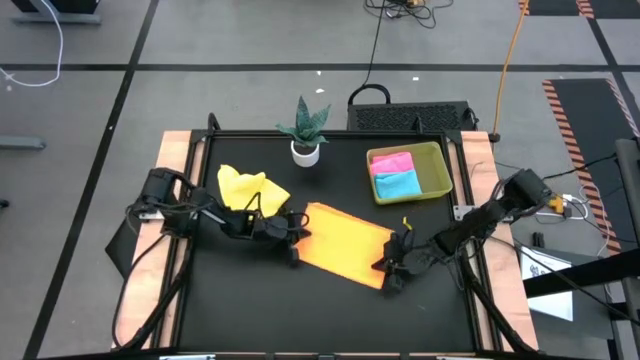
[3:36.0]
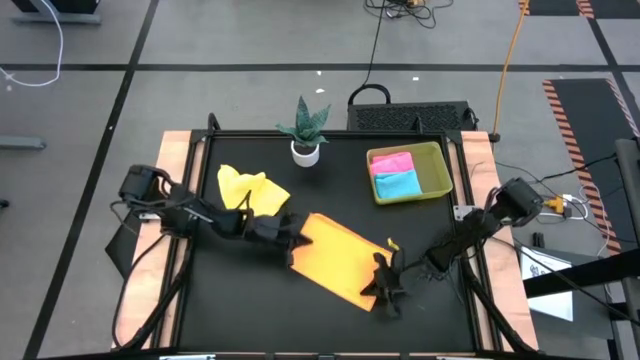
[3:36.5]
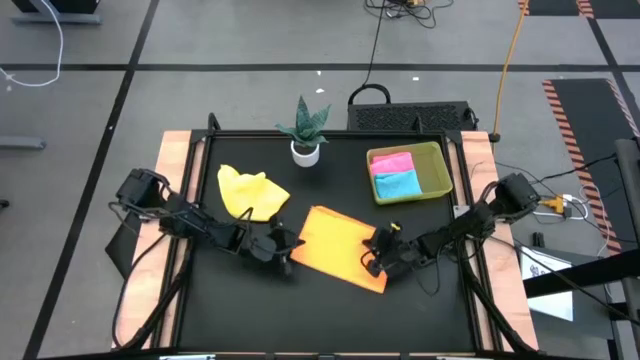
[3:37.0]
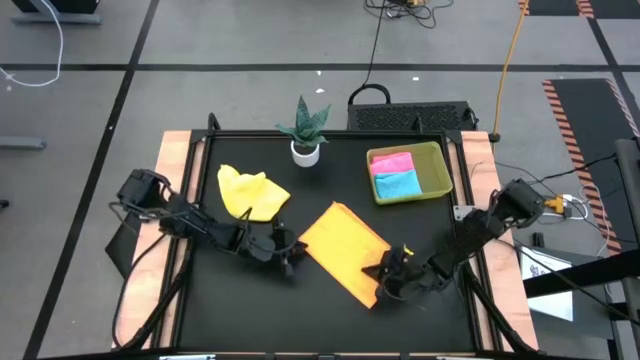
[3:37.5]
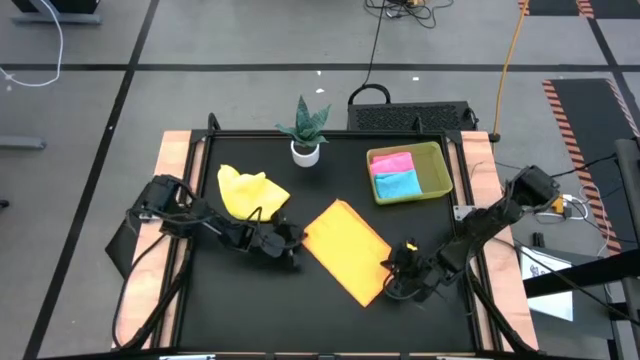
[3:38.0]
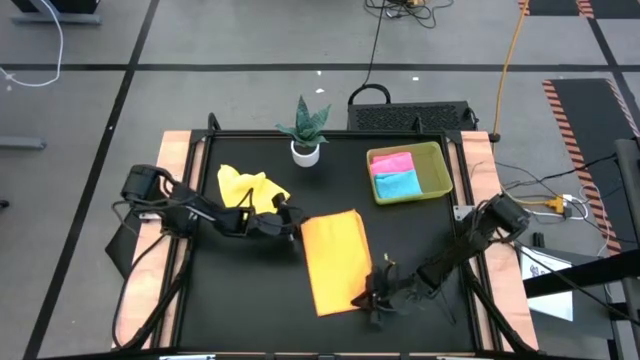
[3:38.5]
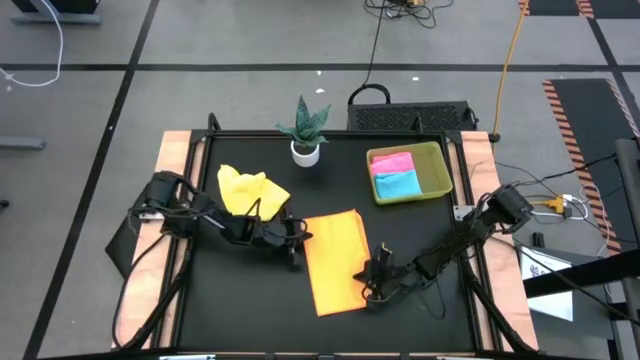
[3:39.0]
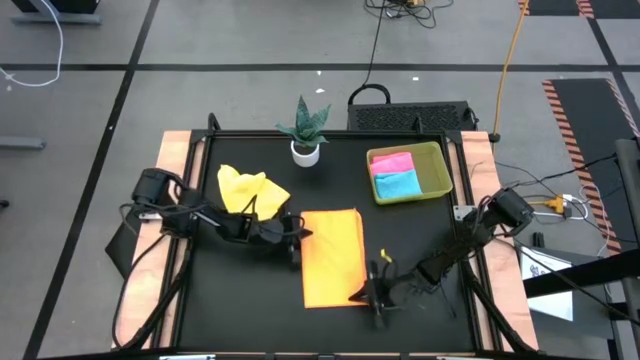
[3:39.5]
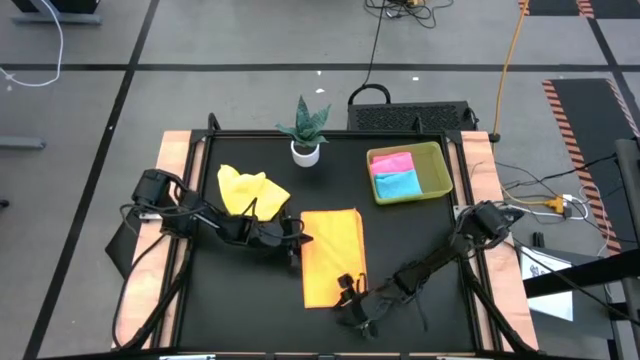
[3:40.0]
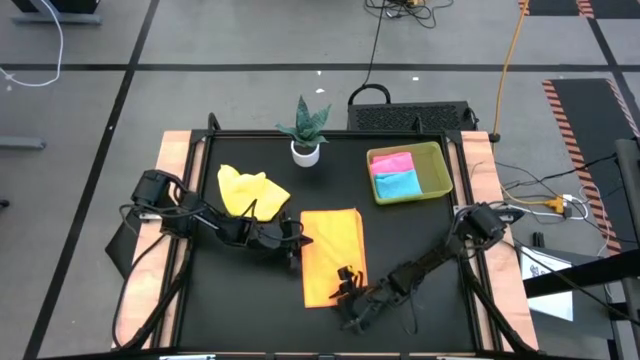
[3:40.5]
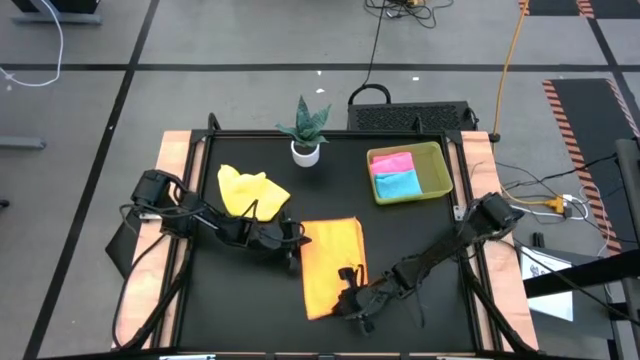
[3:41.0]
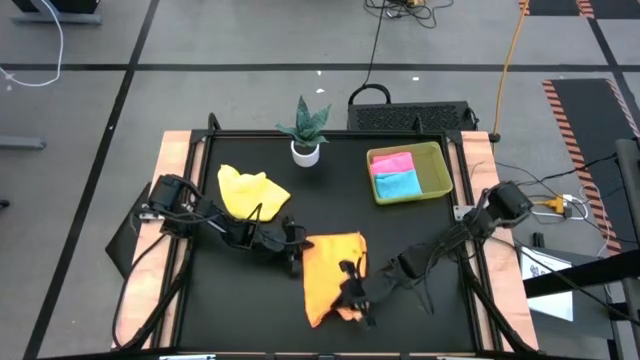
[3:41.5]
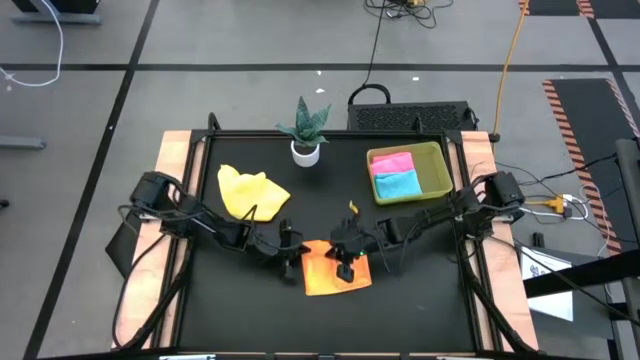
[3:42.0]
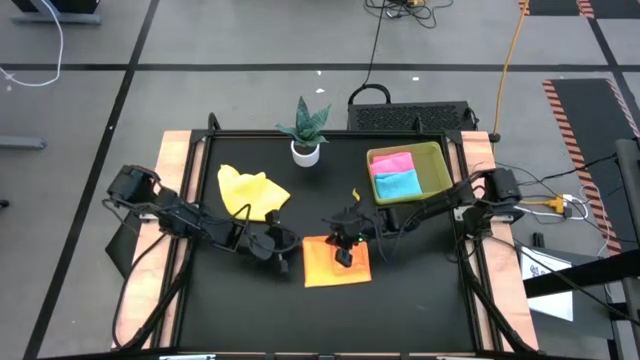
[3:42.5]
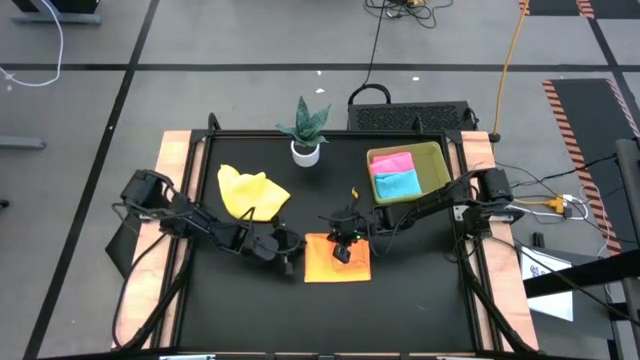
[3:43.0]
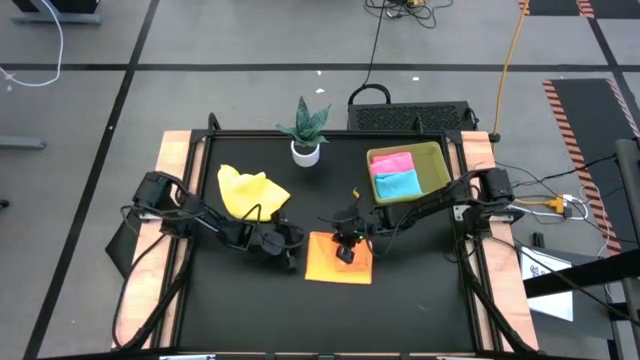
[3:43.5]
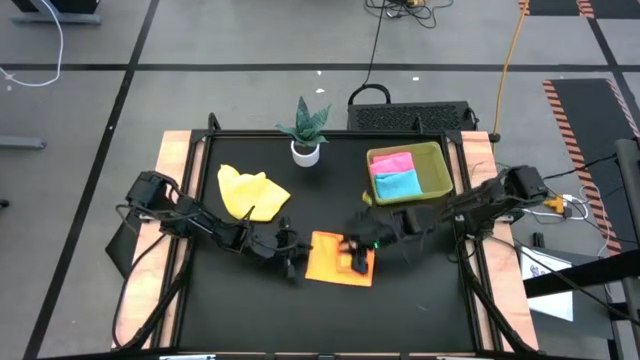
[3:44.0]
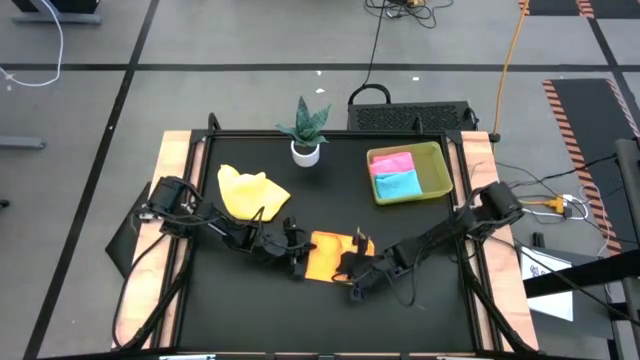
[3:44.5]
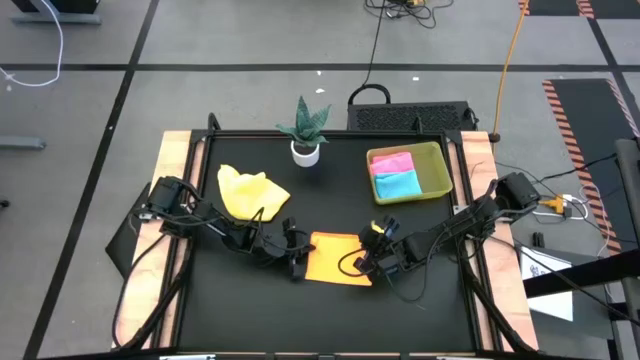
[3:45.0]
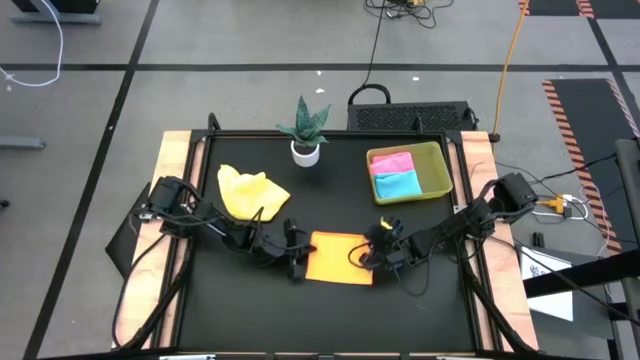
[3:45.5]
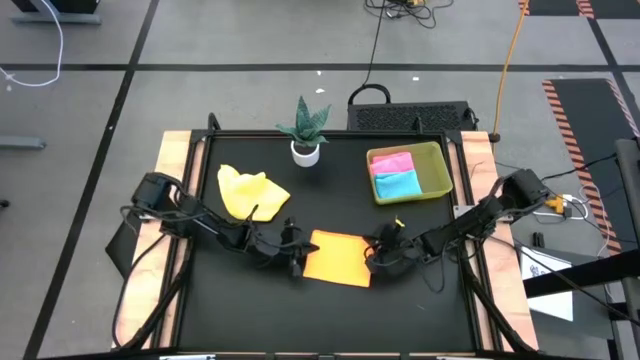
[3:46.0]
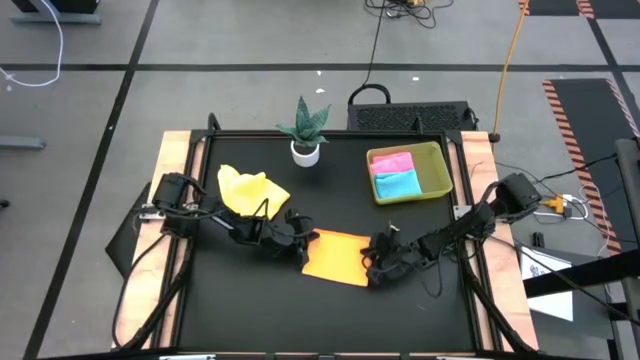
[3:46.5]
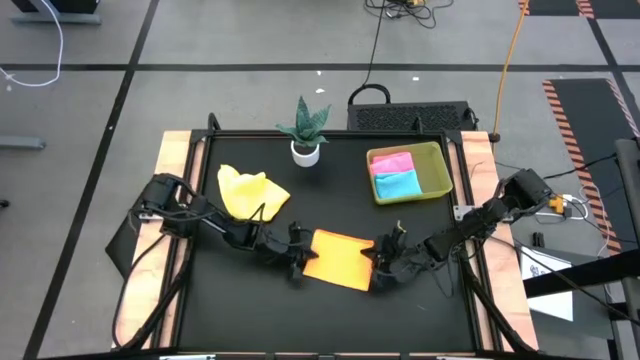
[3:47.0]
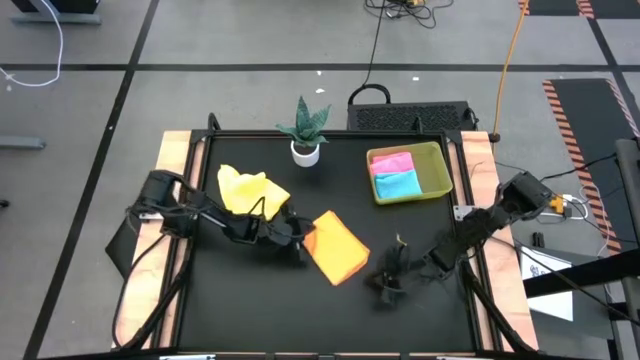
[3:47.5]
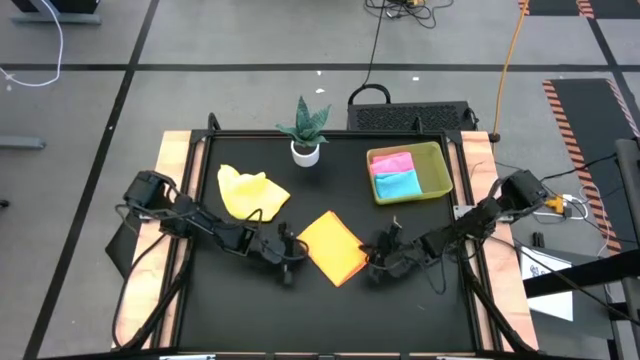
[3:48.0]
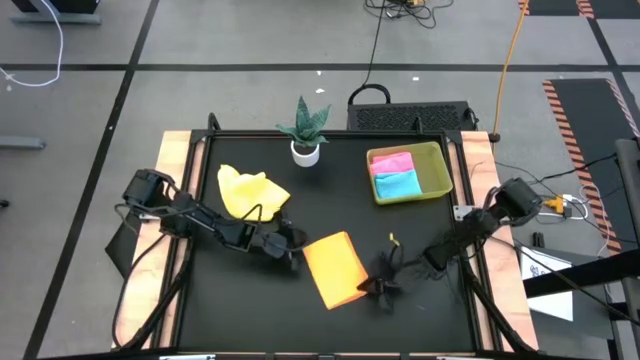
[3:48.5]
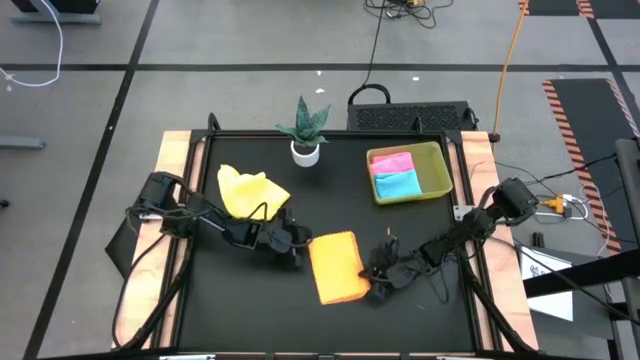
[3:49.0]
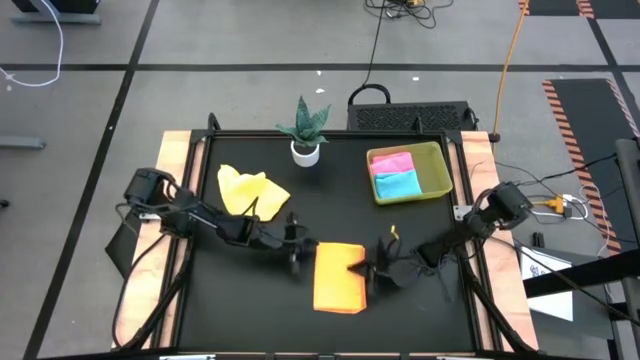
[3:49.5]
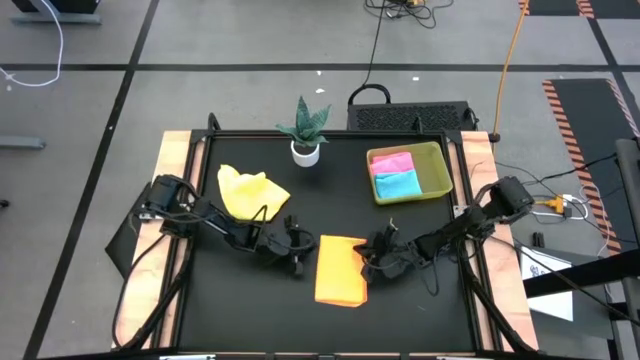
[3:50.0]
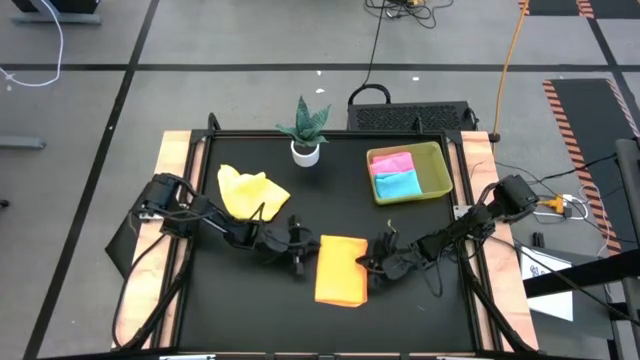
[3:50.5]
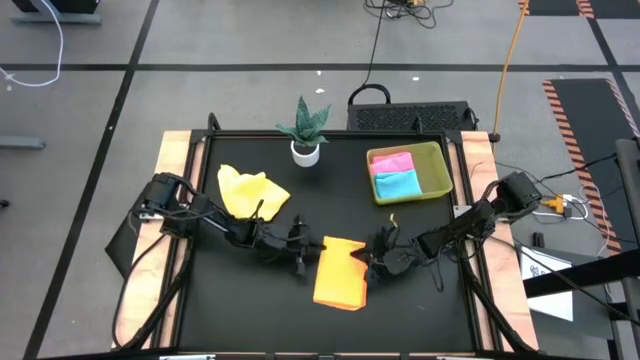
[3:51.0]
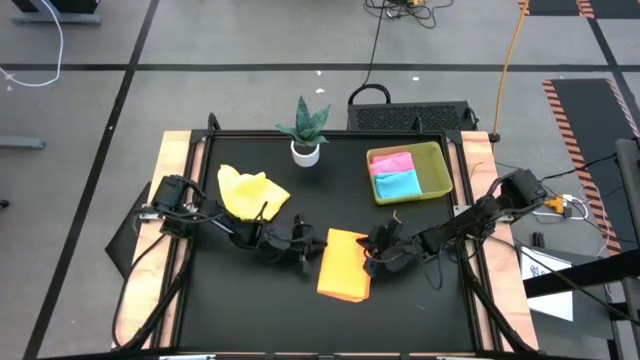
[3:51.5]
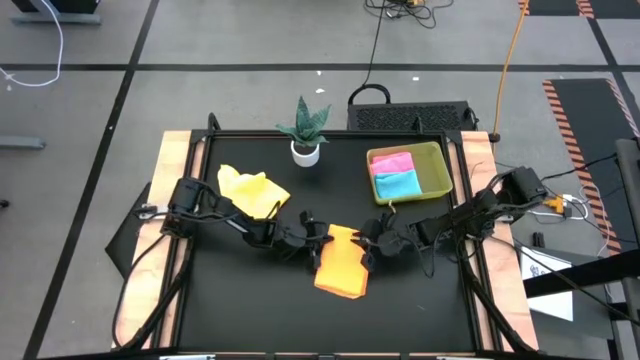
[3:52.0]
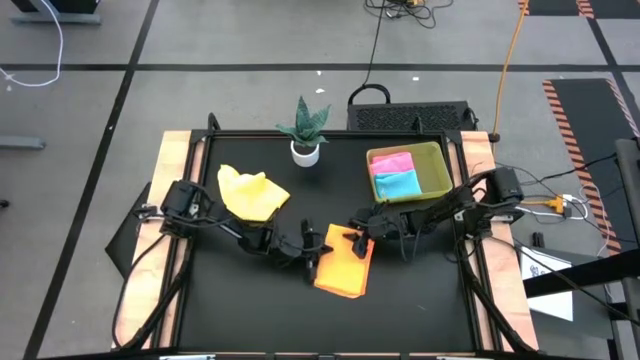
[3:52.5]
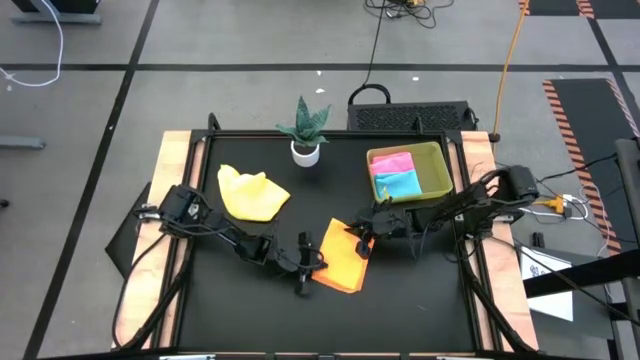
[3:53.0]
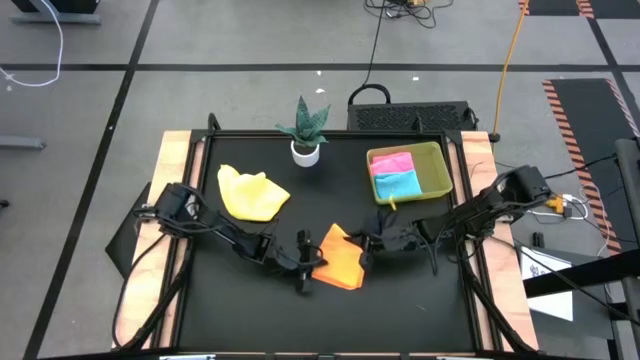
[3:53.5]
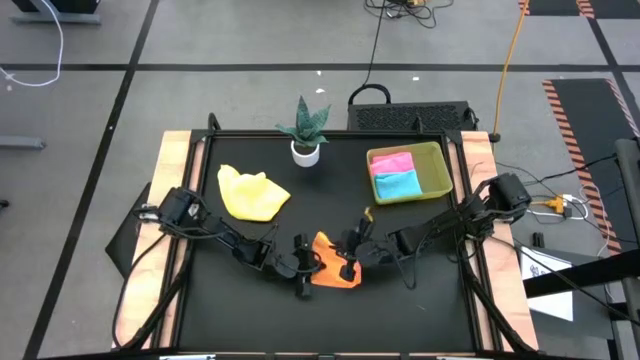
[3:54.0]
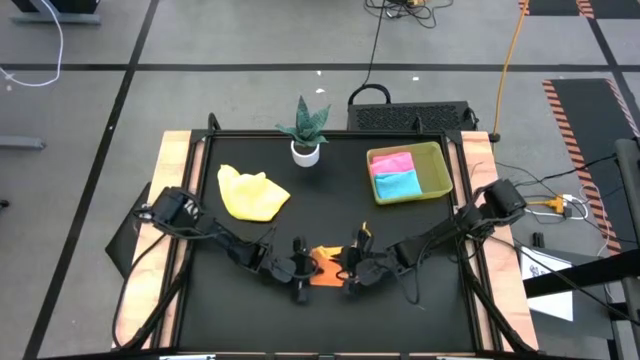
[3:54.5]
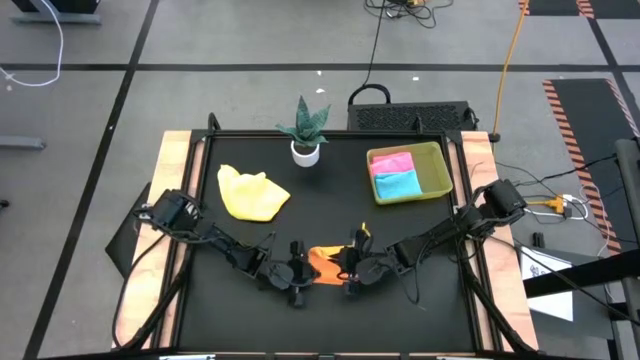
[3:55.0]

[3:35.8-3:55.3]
Task: Fold microfiber towels
Fold the orange microfiber cloth
